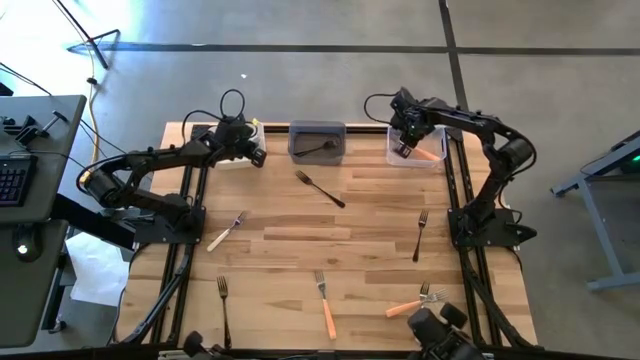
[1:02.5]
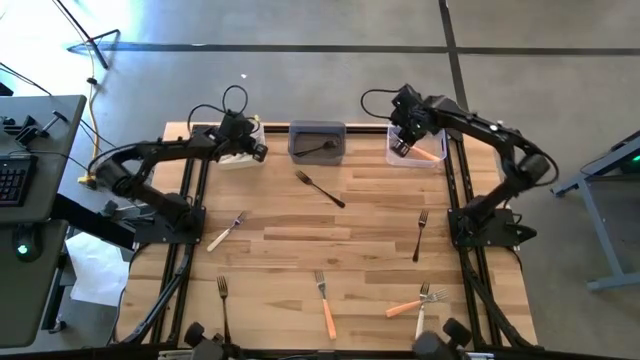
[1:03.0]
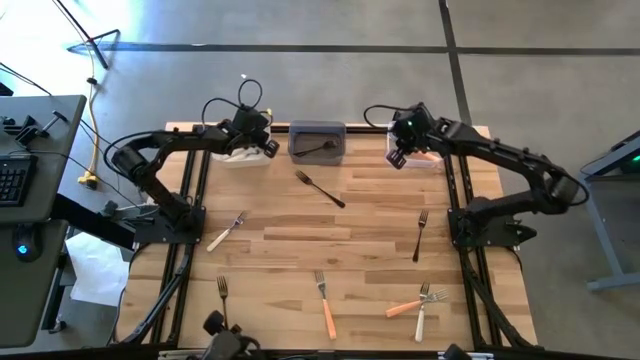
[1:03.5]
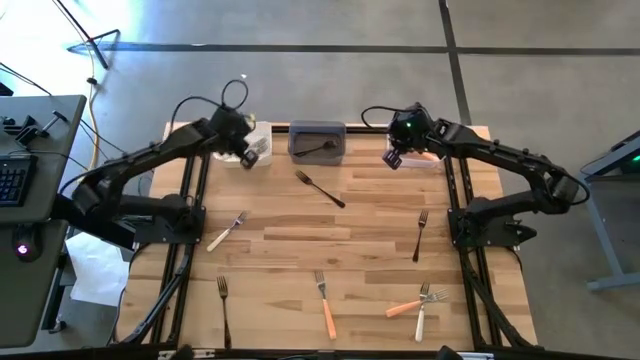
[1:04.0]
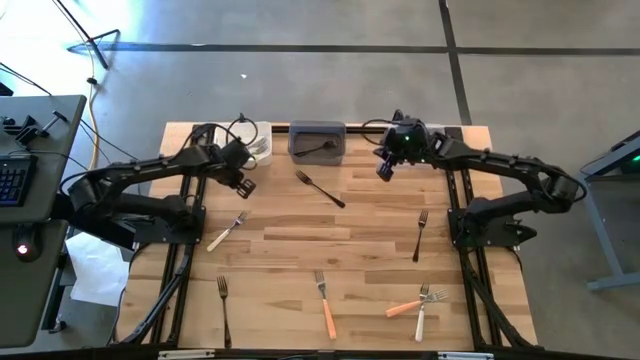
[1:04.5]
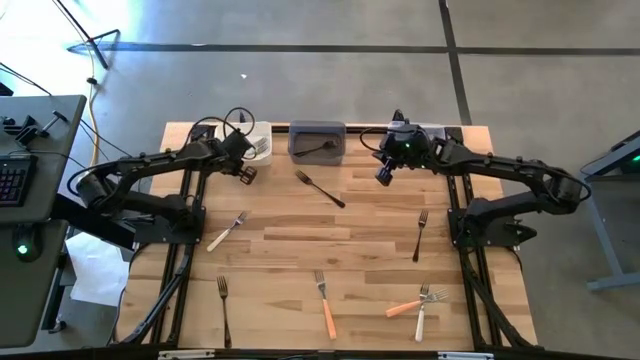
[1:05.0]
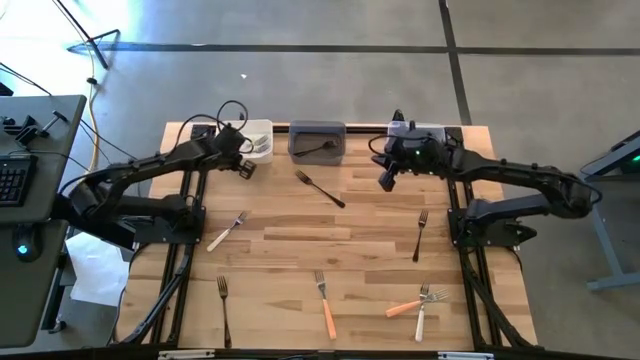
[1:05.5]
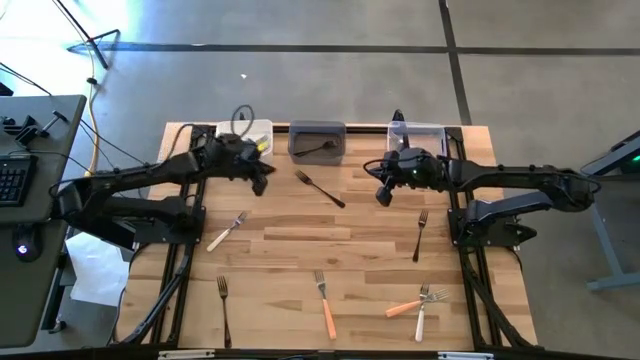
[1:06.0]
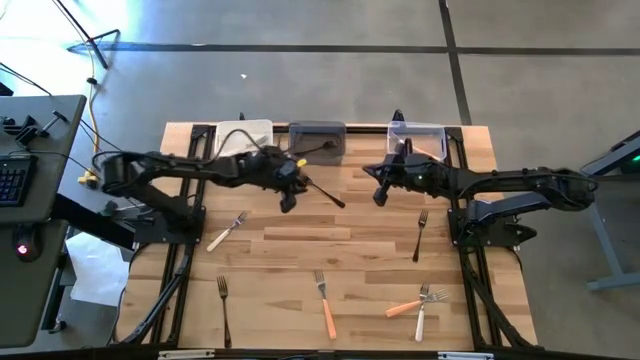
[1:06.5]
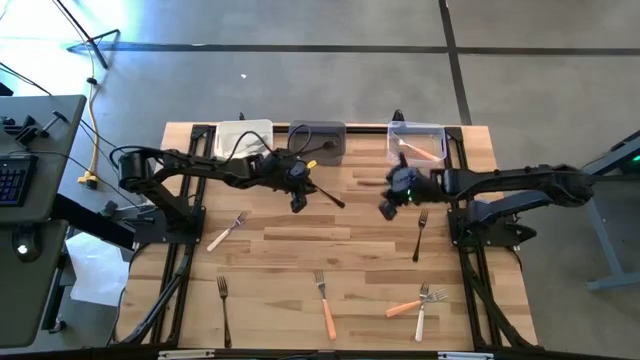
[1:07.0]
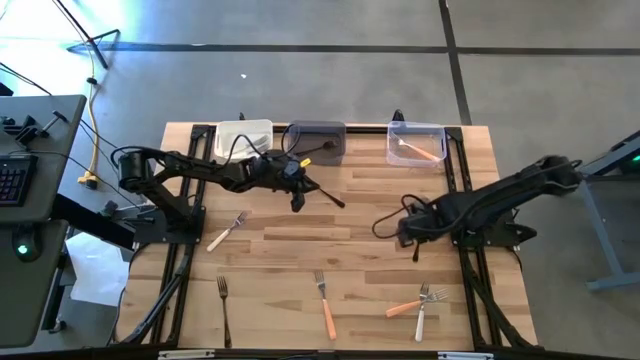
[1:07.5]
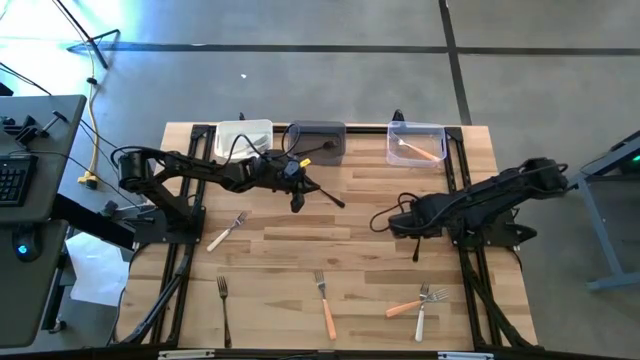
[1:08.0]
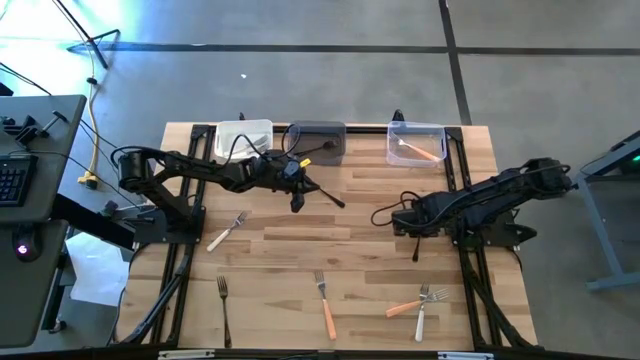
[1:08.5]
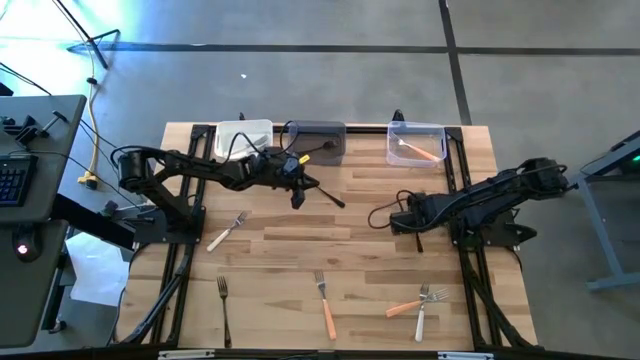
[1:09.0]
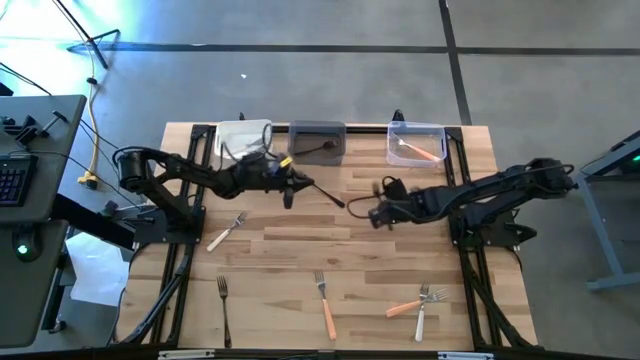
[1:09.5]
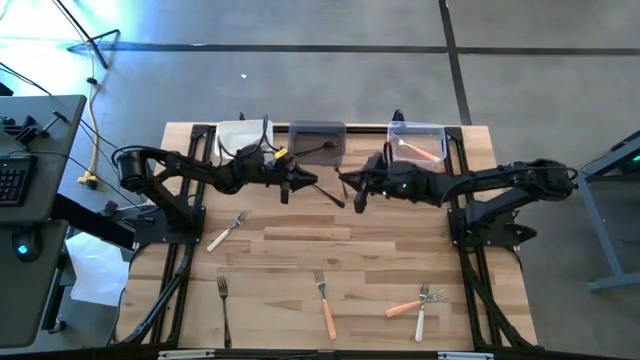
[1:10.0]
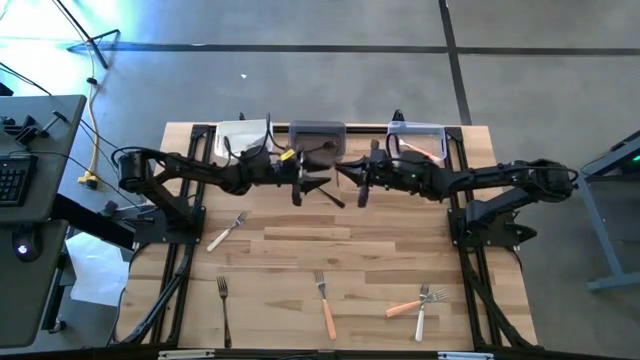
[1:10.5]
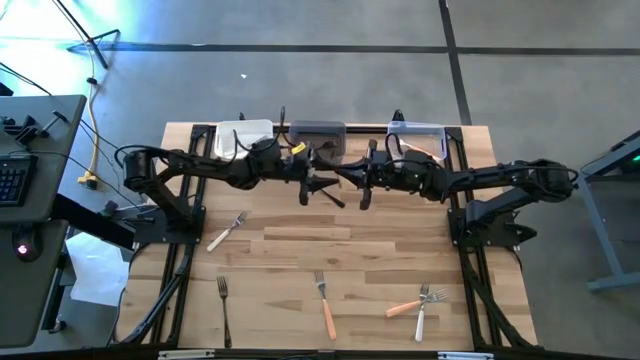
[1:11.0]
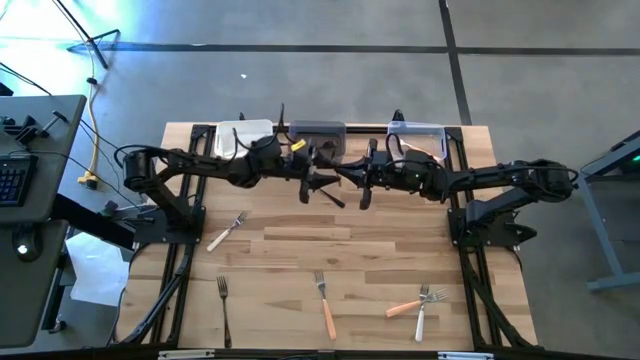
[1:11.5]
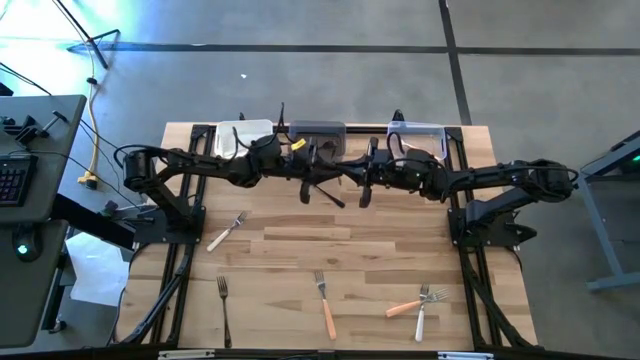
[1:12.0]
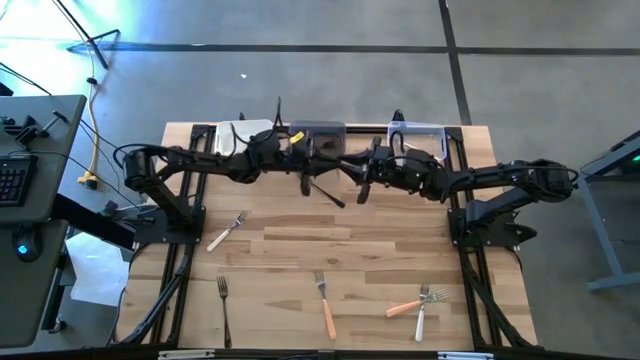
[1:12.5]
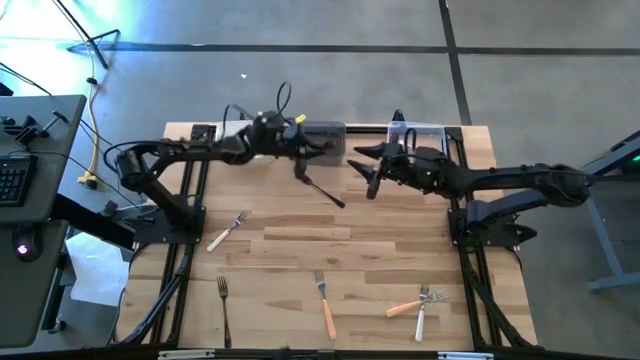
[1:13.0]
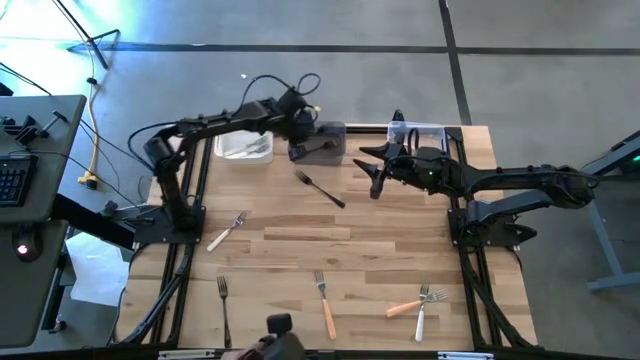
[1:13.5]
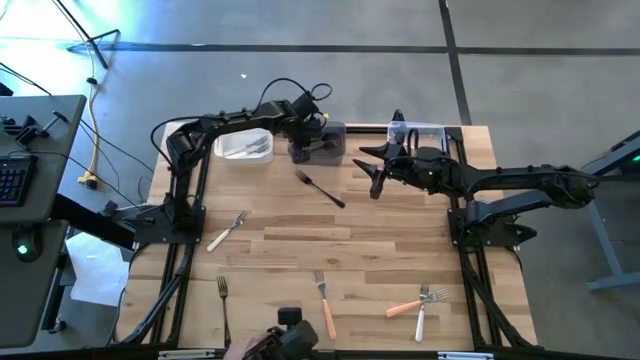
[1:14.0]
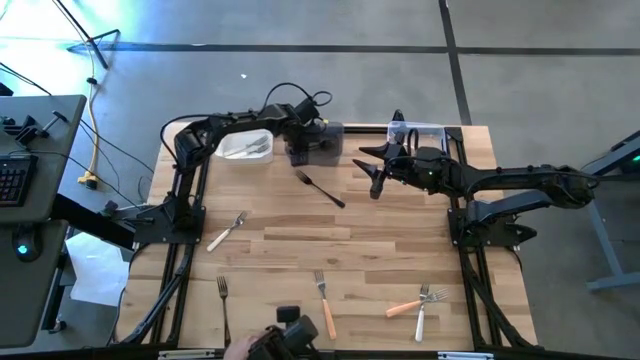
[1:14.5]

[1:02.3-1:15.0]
Task: Sort silverware by color (type)
Put the black fork into the black bin

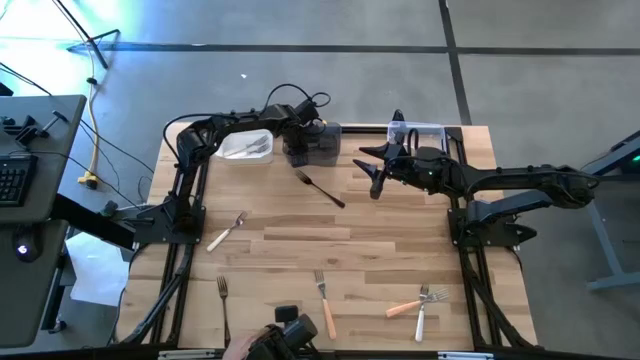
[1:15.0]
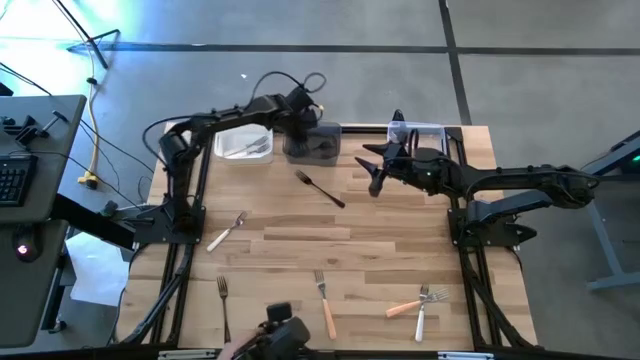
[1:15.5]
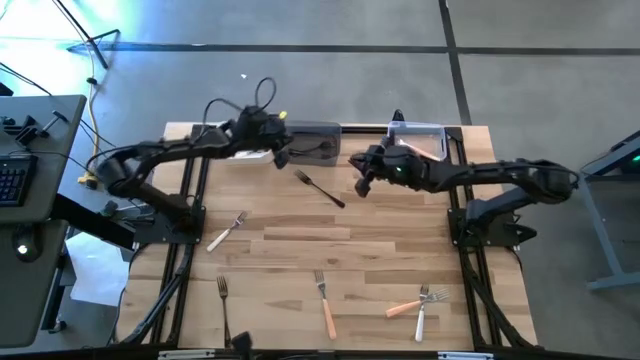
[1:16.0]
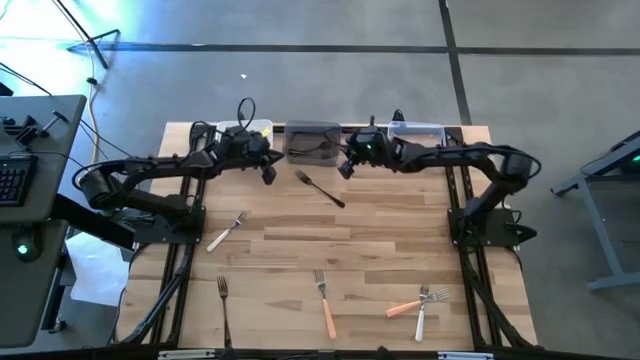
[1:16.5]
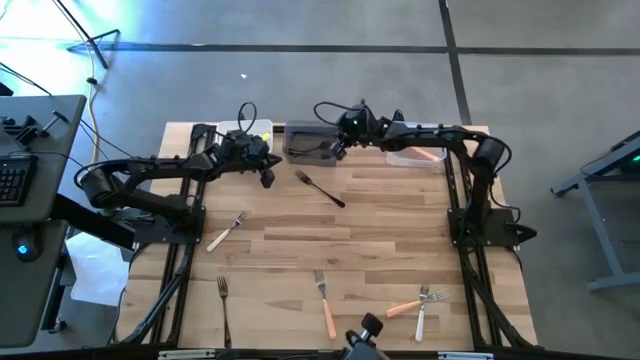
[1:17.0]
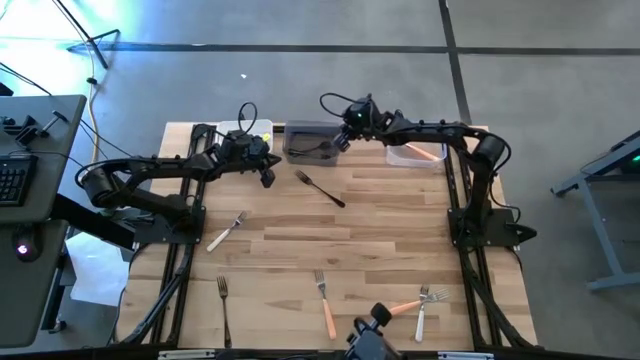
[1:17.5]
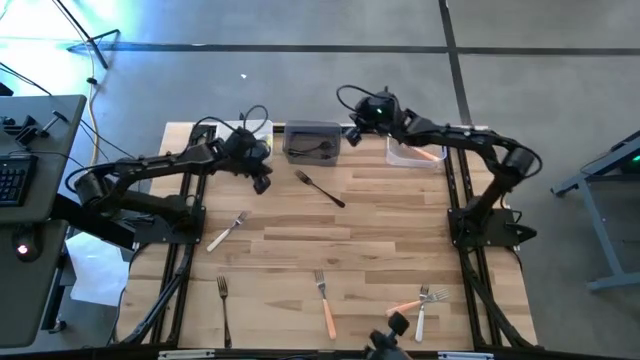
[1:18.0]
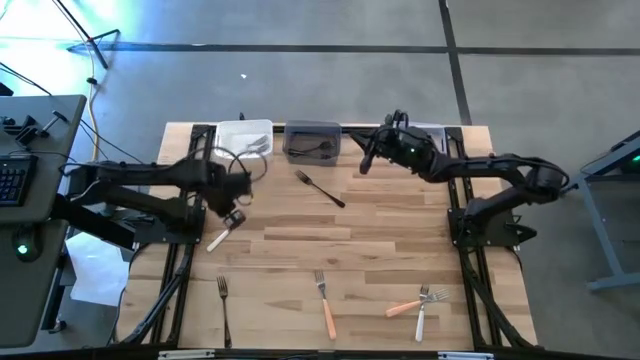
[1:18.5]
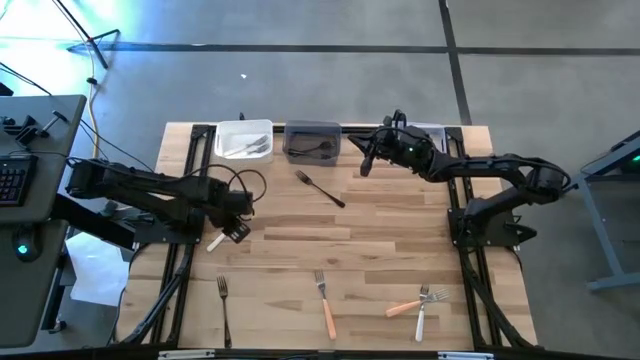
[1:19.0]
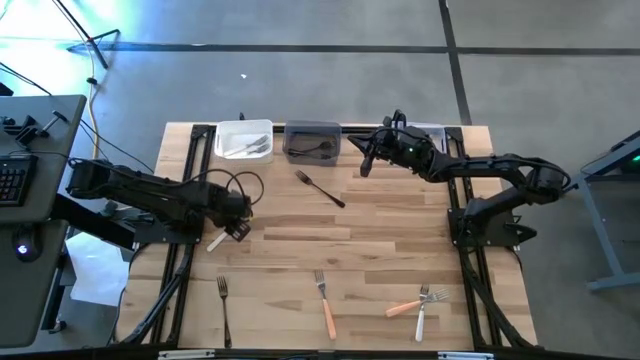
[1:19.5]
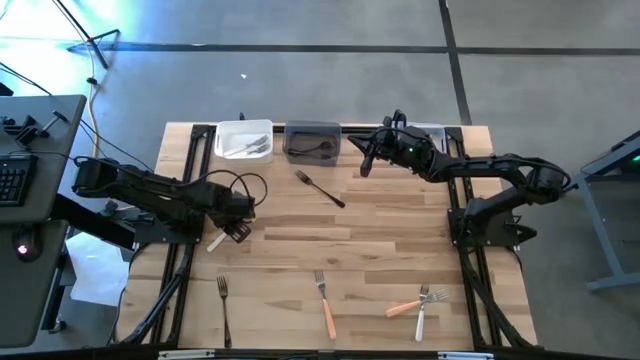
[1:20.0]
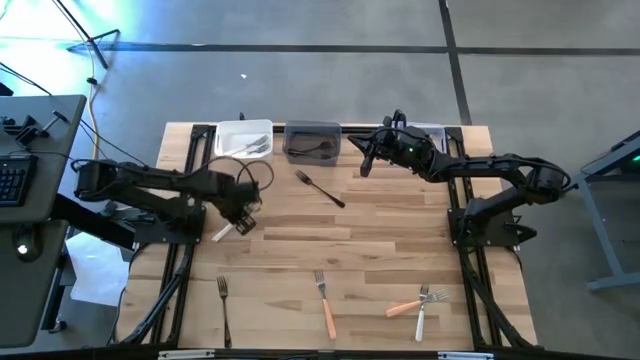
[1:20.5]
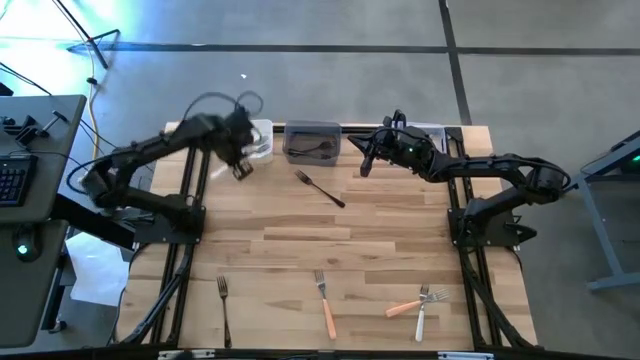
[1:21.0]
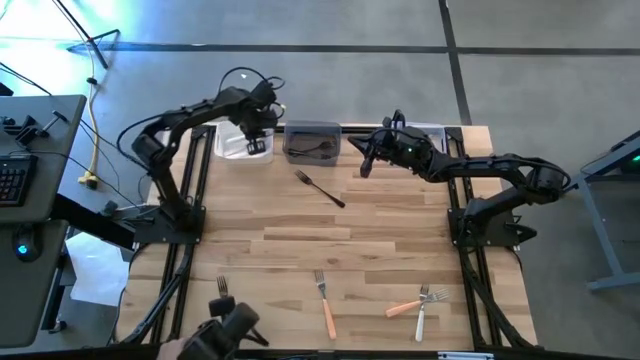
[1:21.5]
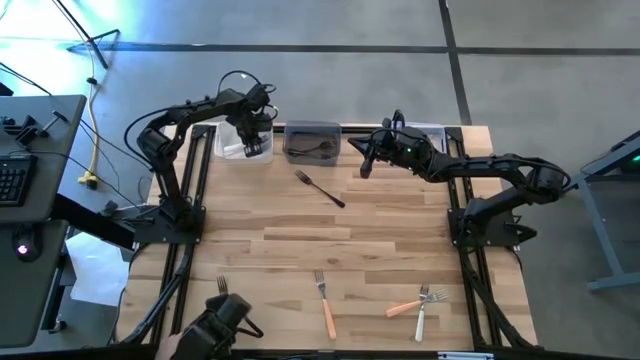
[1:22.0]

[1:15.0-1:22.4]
Put the white fork into the white bin
